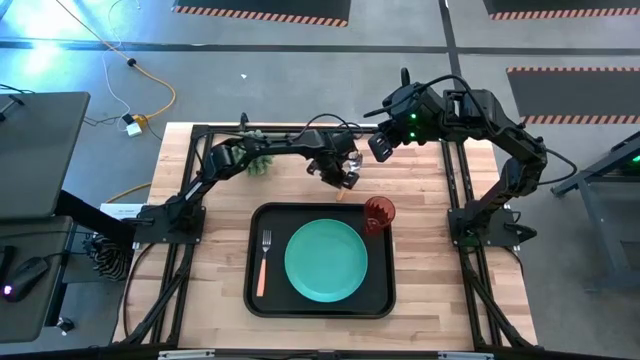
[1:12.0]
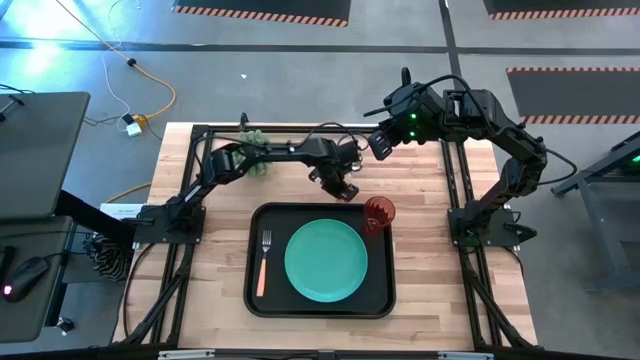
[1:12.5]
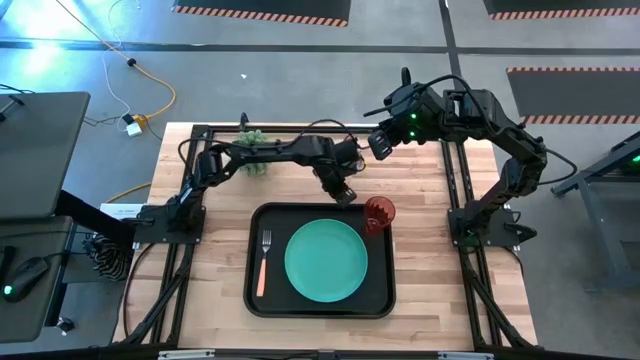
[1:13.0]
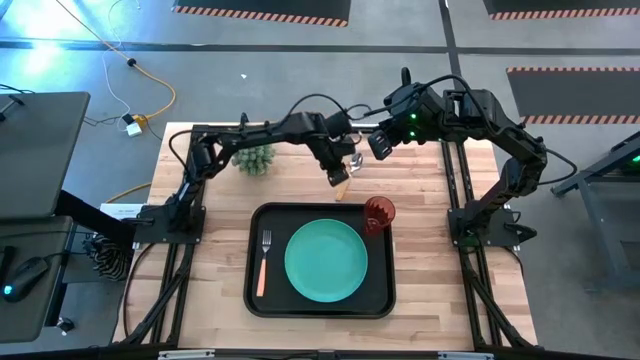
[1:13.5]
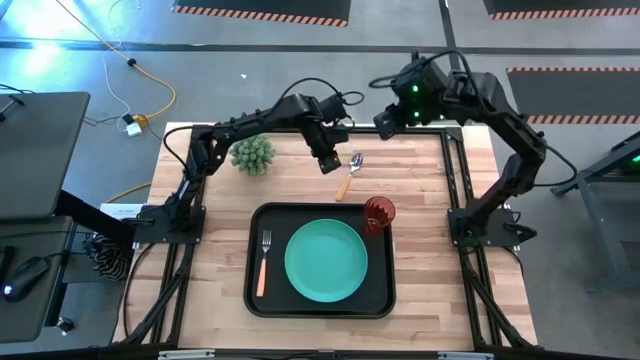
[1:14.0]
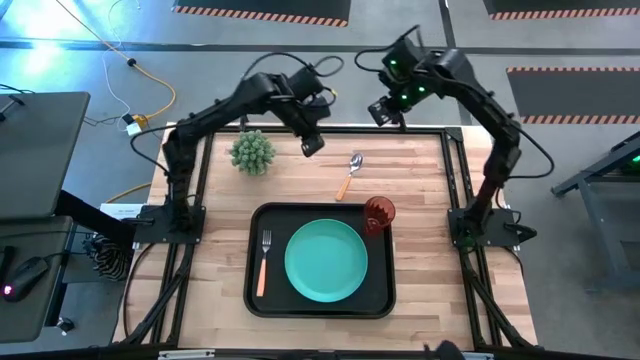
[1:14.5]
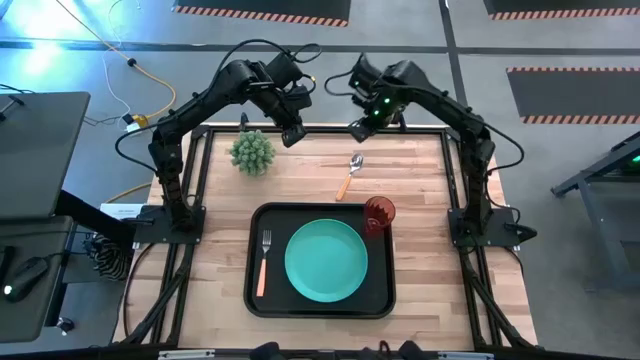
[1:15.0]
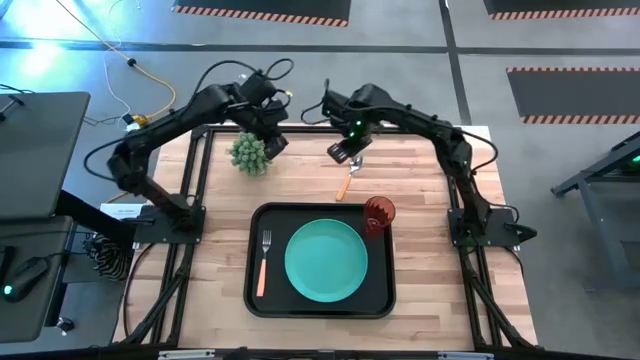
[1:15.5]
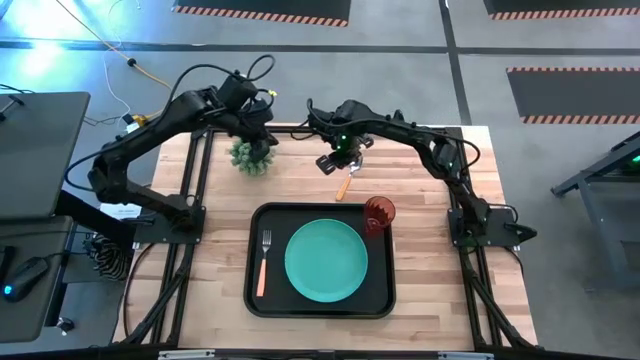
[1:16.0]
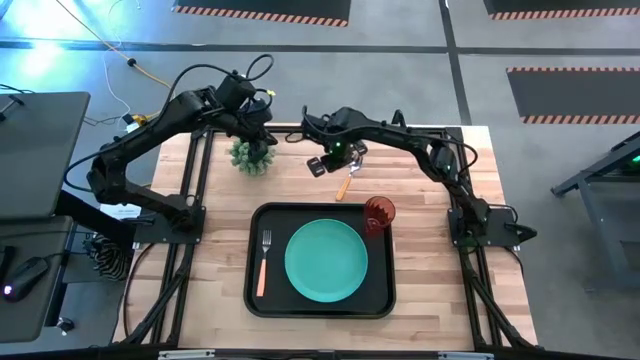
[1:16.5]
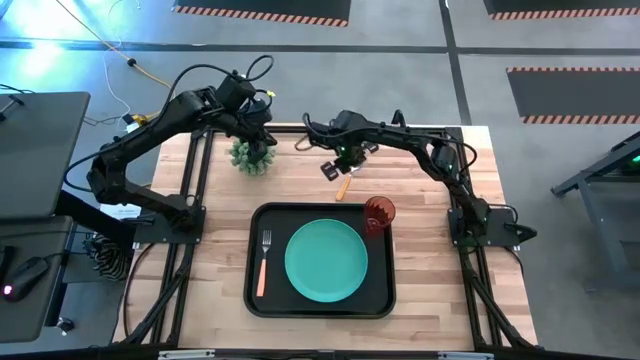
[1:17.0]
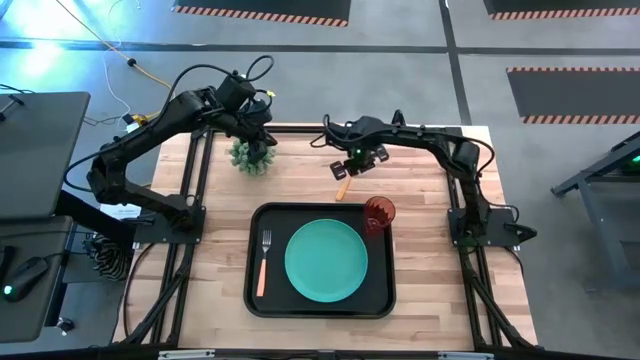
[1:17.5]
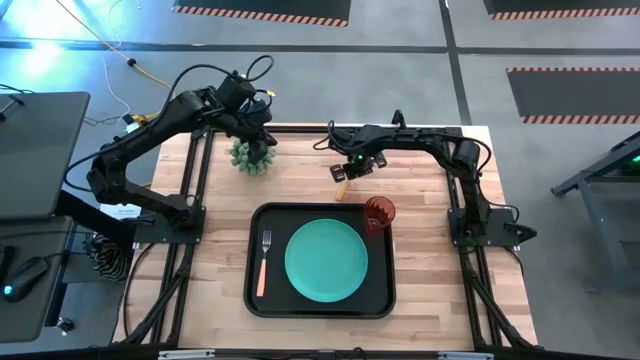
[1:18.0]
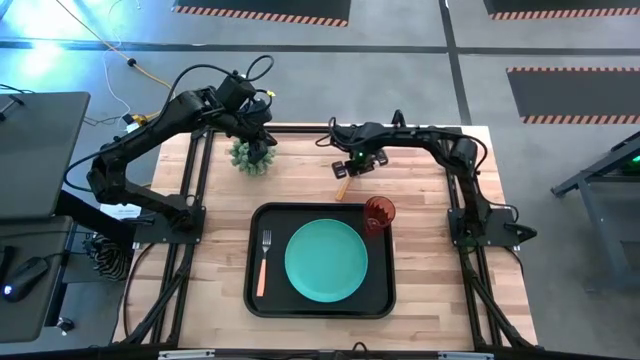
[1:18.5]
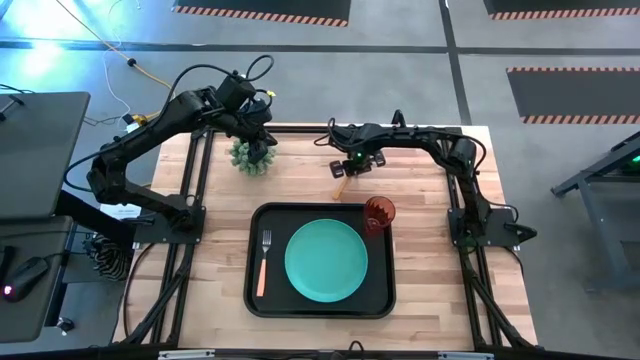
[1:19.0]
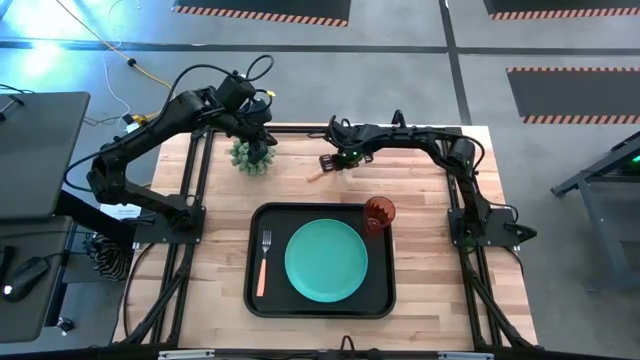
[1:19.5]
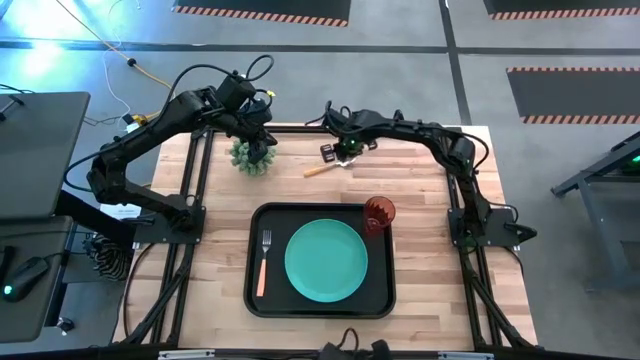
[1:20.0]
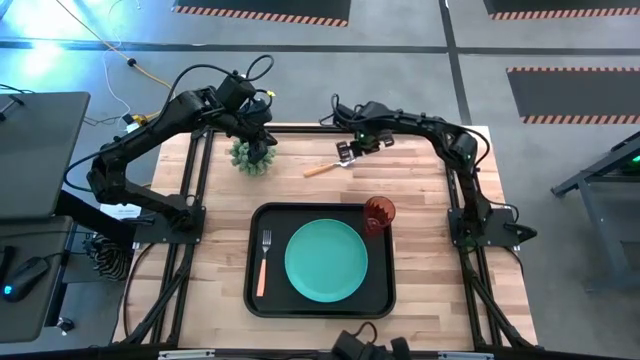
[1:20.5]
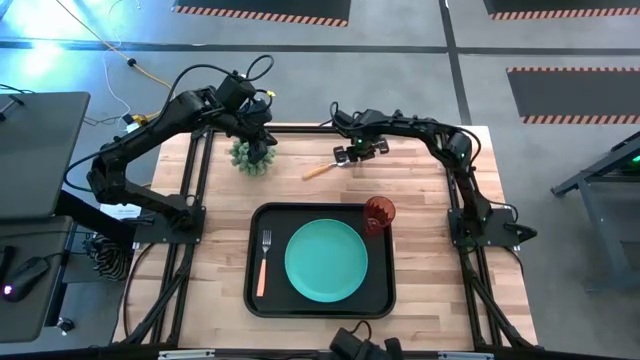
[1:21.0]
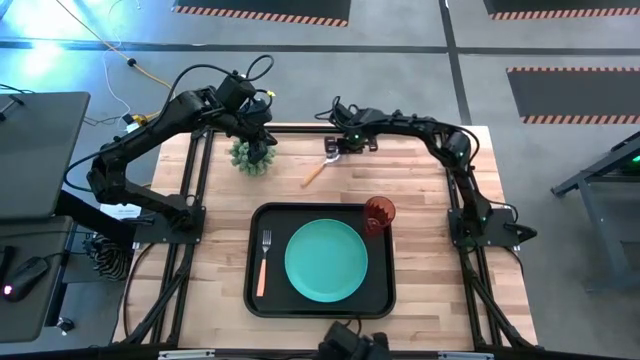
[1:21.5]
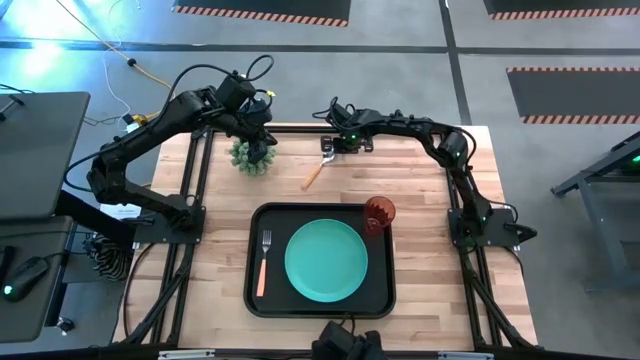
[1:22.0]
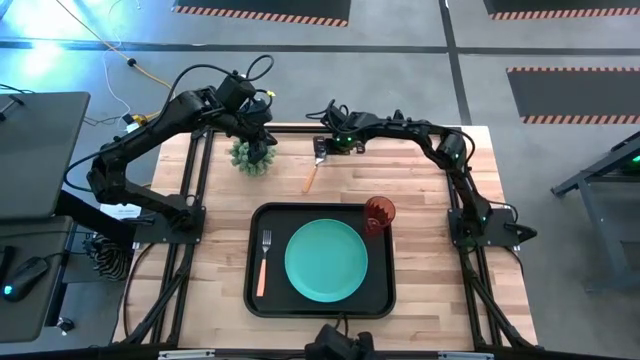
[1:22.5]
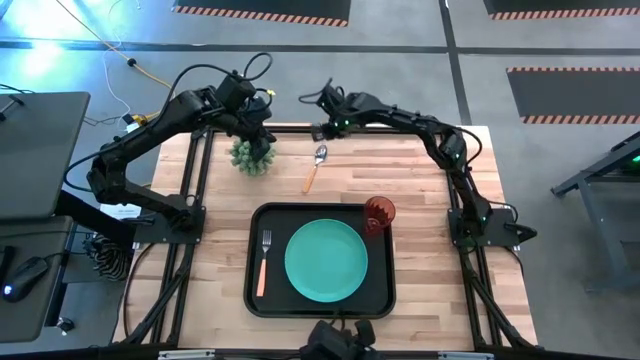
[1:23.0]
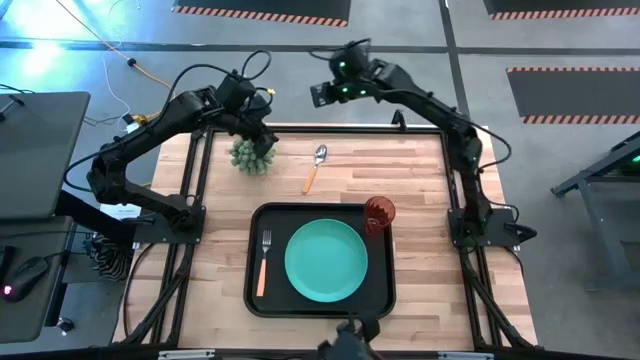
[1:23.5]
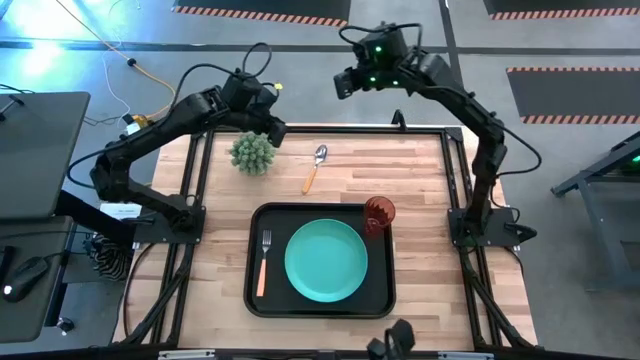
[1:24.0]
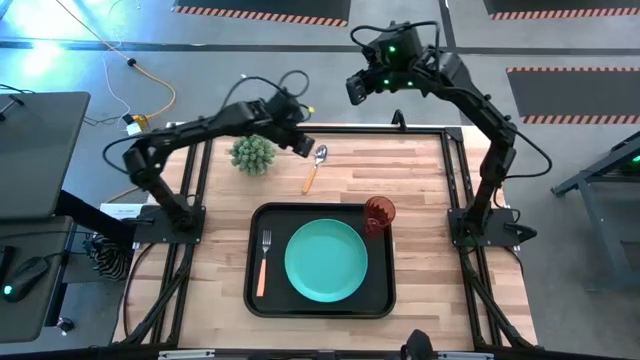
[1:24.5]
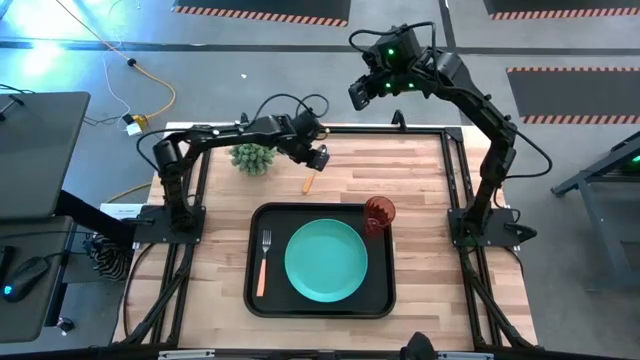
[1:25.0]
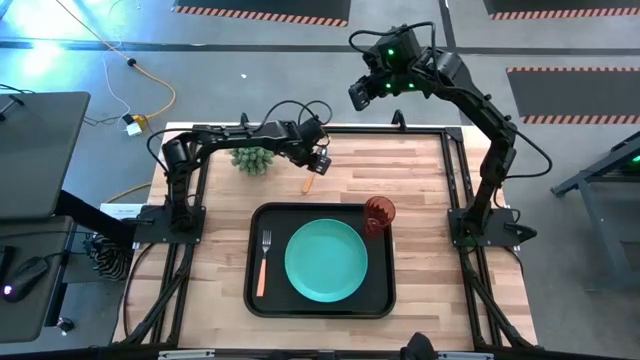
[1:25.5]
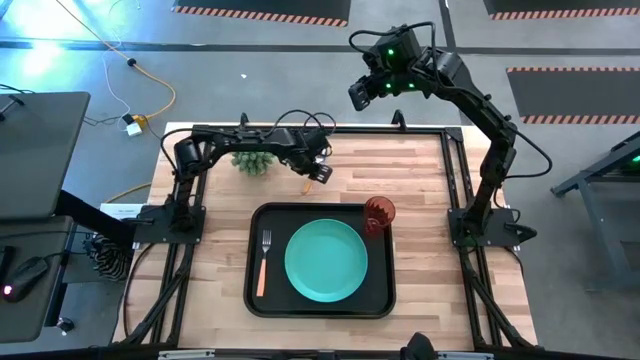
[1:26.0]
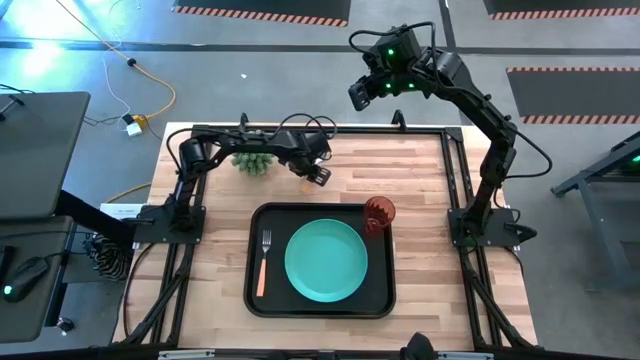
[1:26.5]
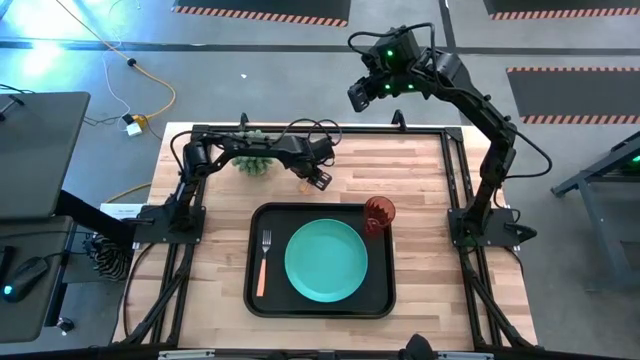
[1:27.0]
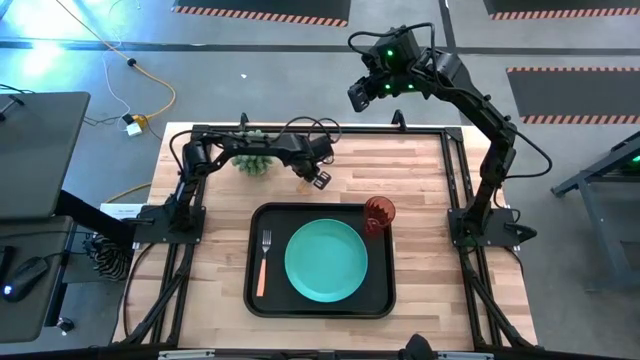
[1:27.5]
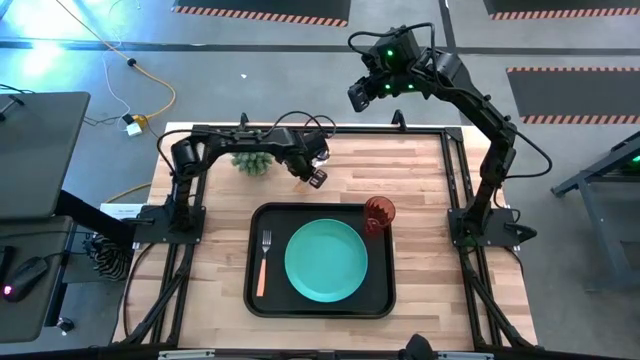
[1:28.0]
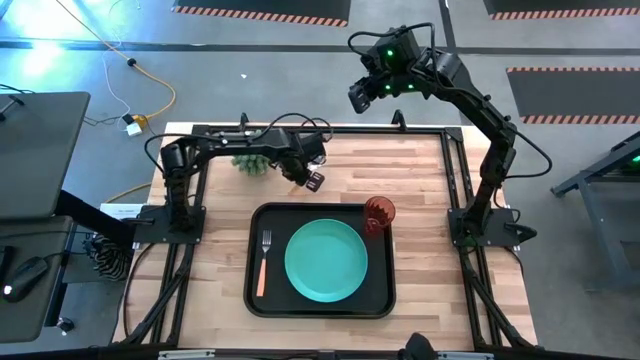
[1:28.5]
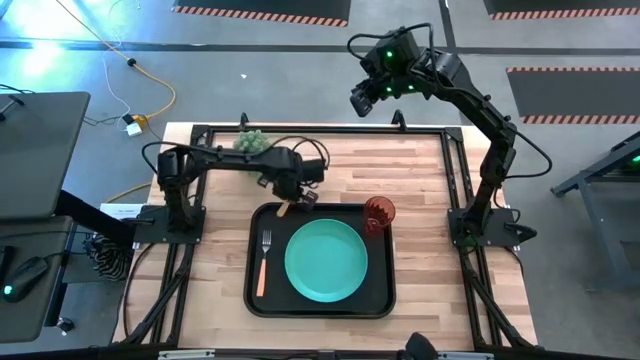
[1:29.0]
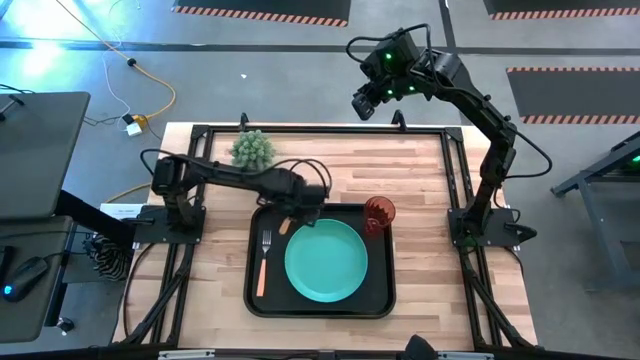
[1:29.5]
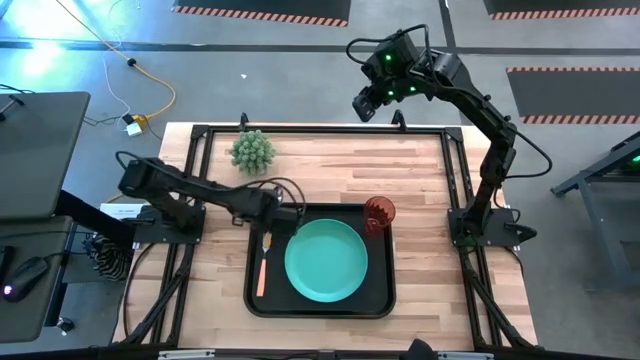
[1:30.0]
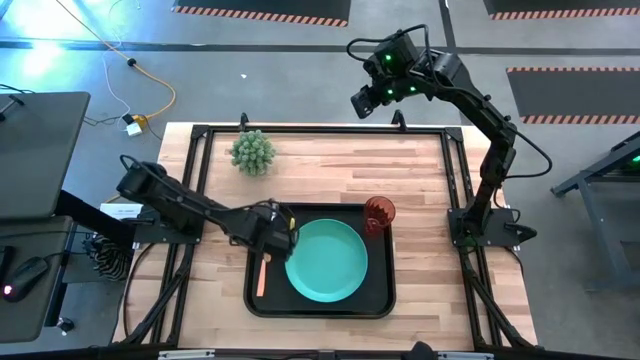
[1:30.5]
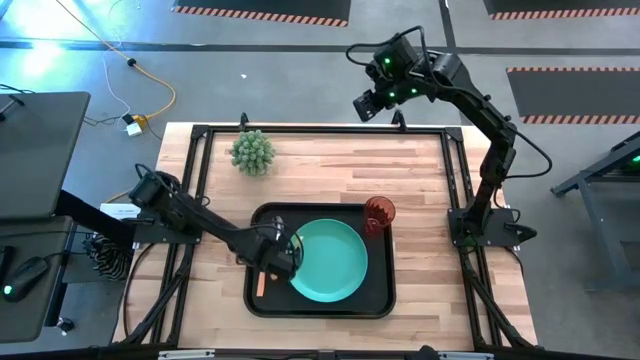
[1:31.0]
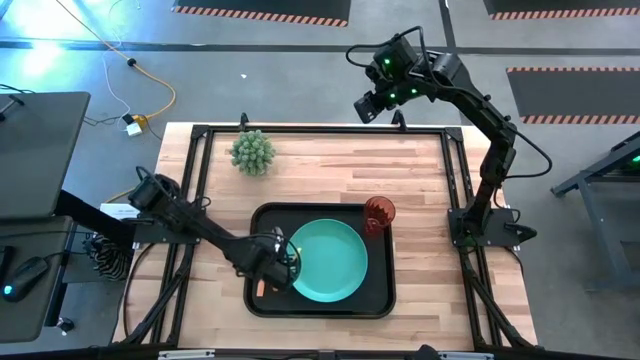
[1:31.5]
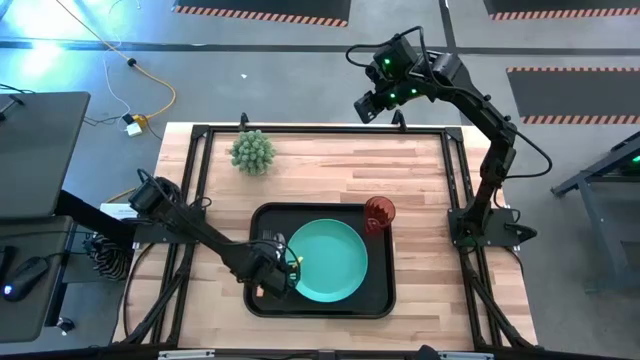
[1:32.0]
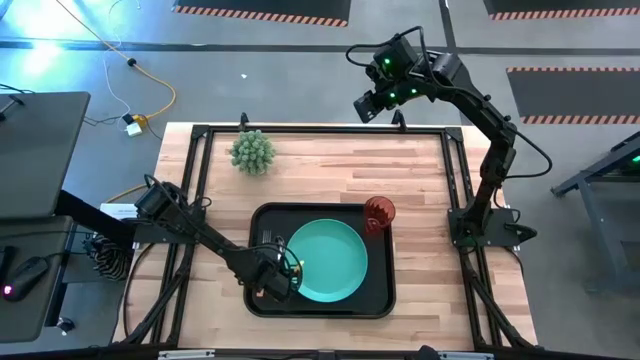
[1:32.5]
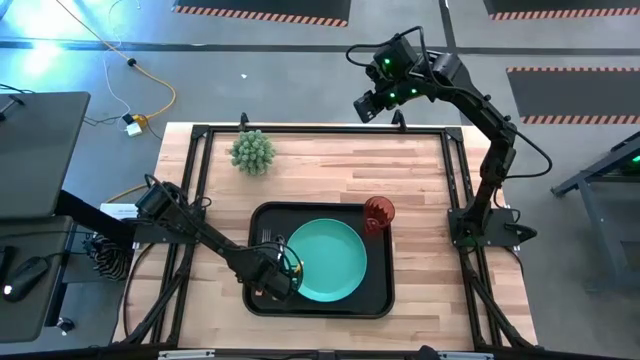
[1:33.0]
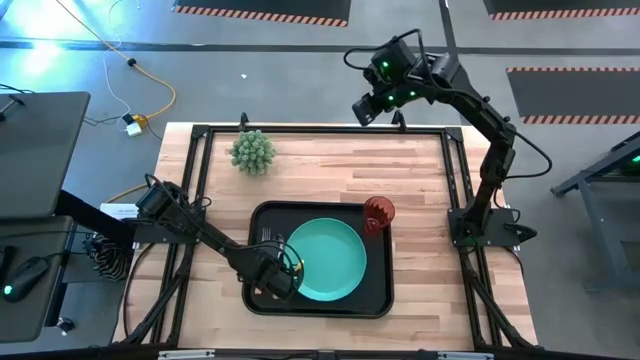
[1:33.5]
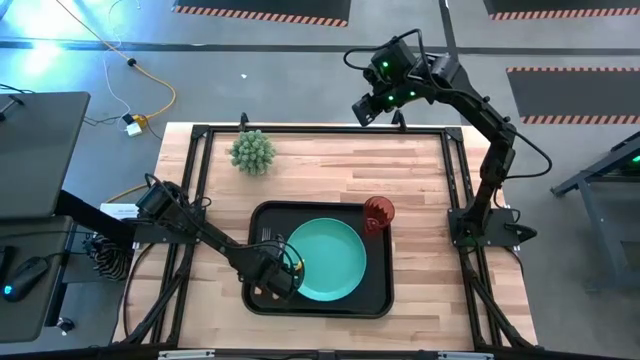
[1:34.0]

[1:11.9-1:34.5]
Task: Pick and place plate/cup/fork/spoon on tray
Put the yellow spoon on the black tray between the orange fork and blue plate
